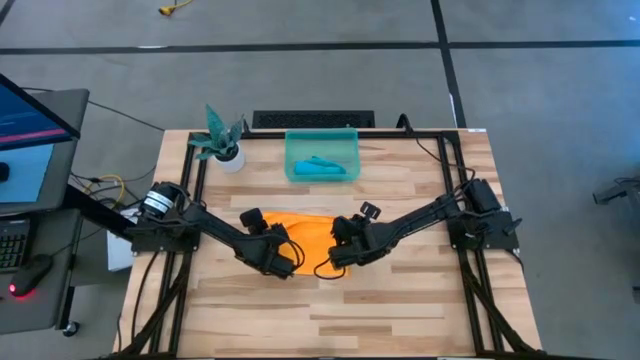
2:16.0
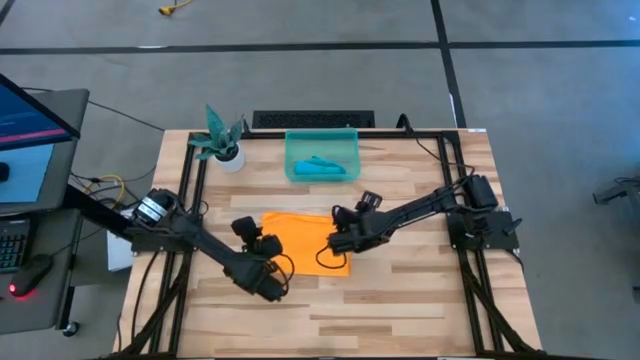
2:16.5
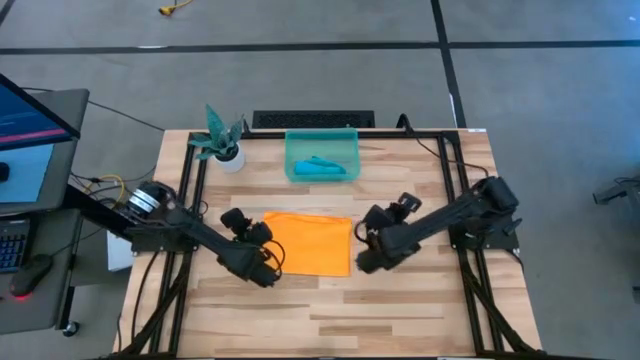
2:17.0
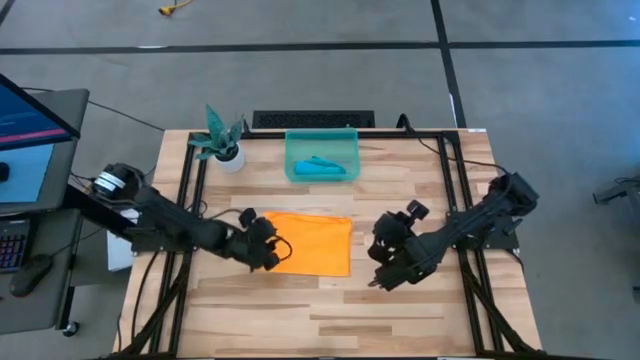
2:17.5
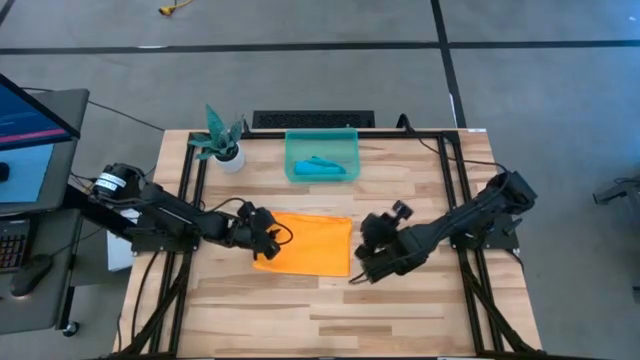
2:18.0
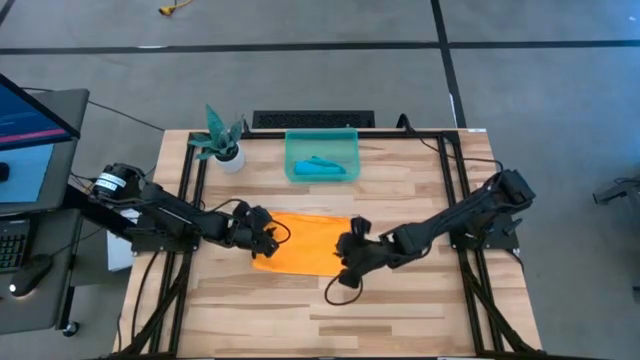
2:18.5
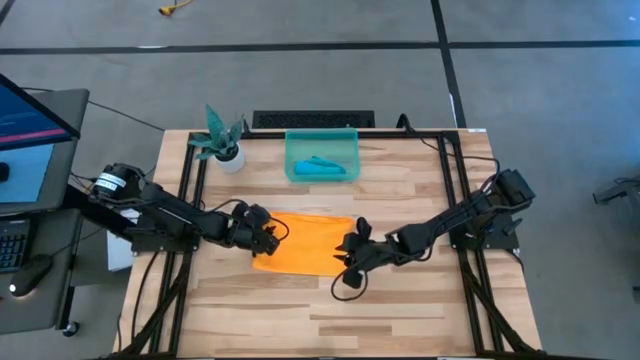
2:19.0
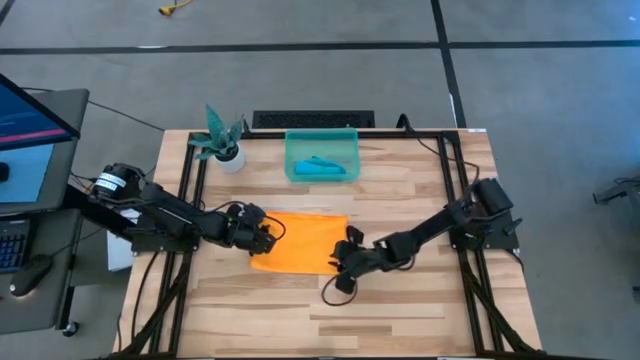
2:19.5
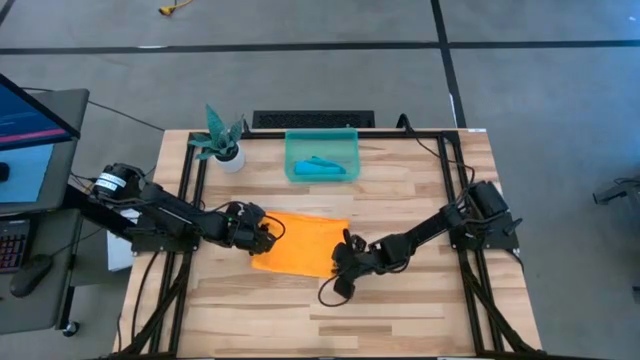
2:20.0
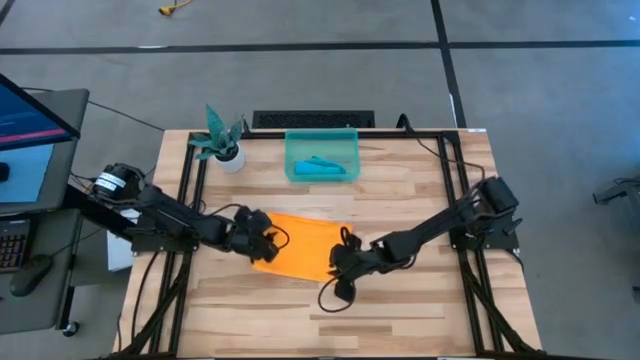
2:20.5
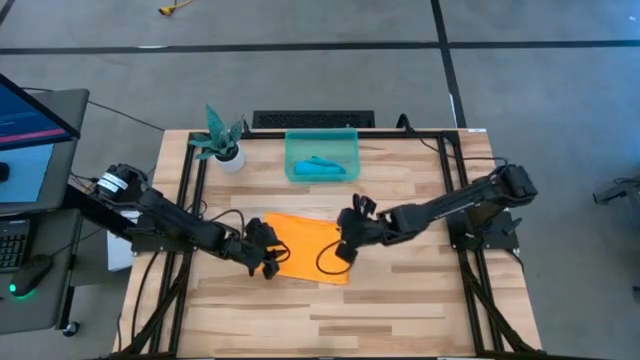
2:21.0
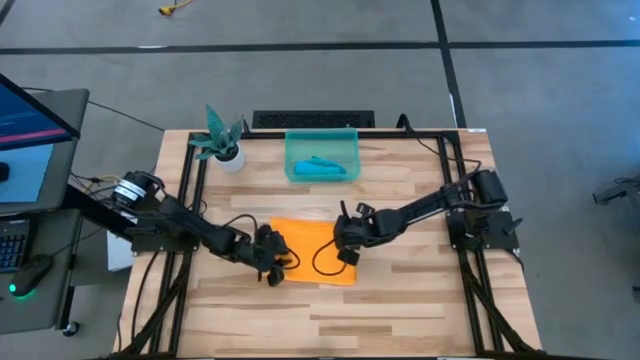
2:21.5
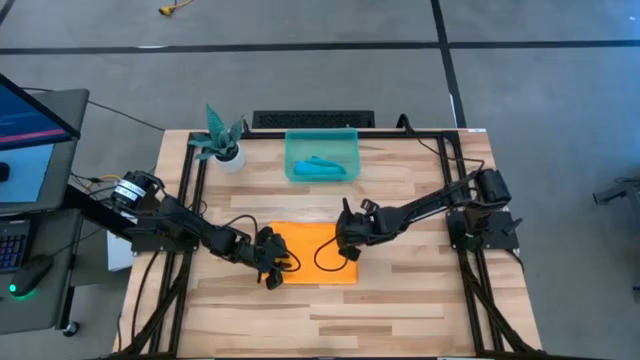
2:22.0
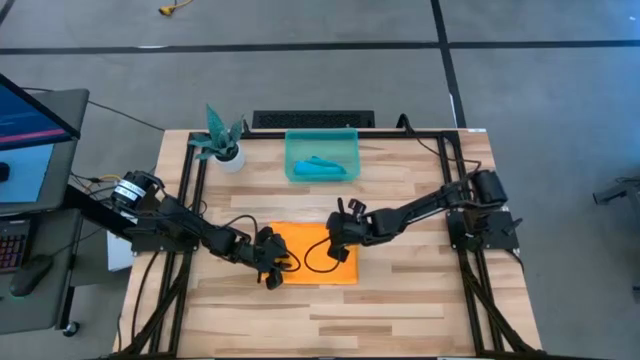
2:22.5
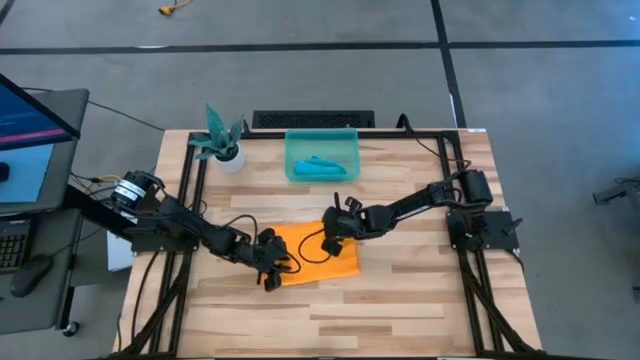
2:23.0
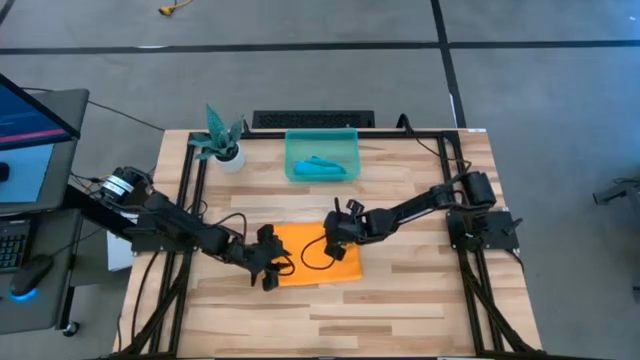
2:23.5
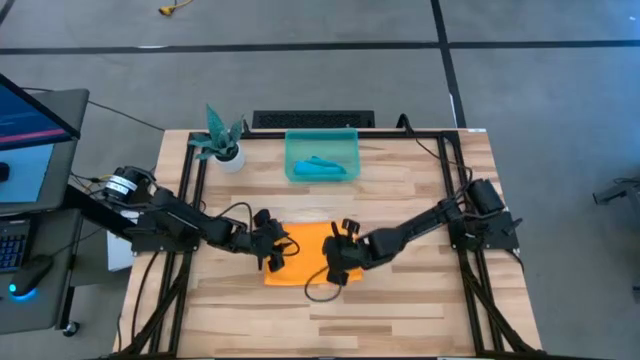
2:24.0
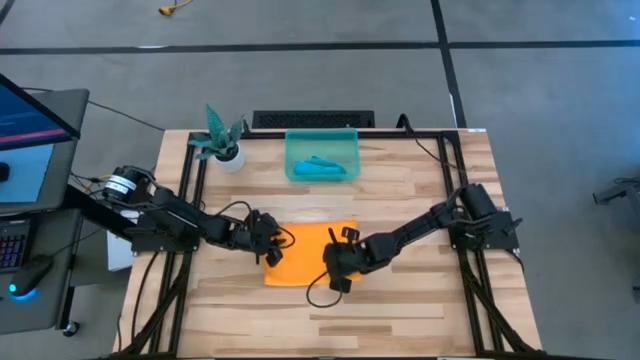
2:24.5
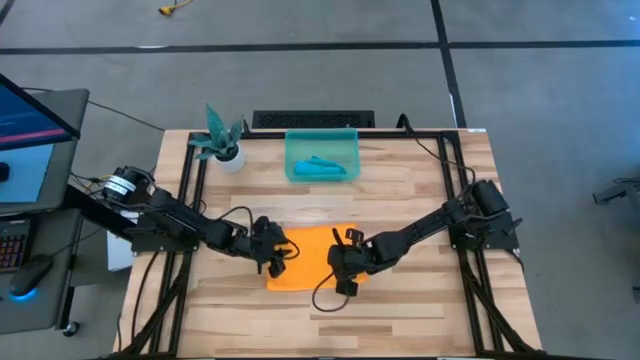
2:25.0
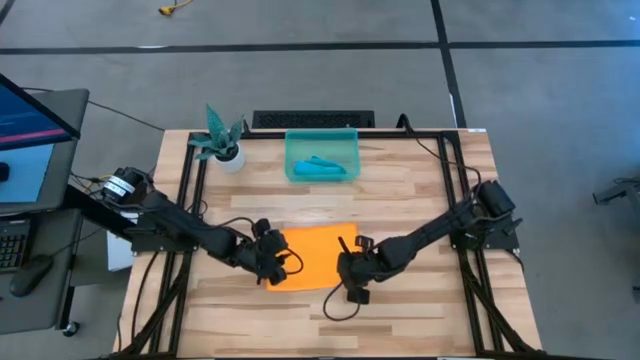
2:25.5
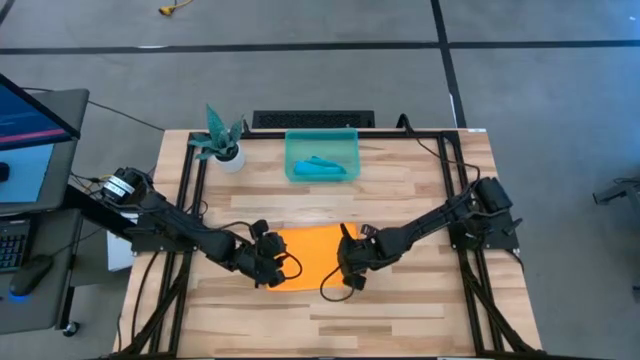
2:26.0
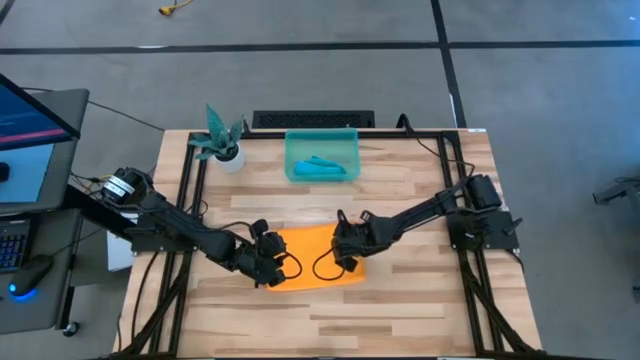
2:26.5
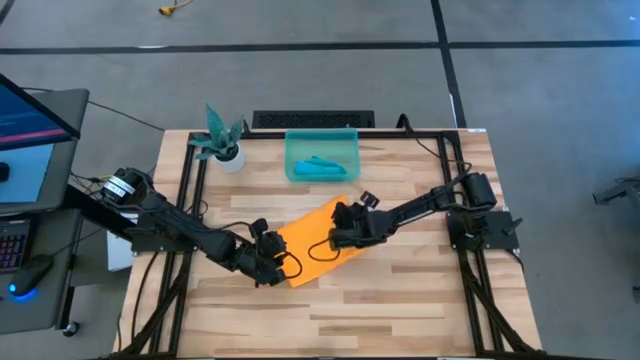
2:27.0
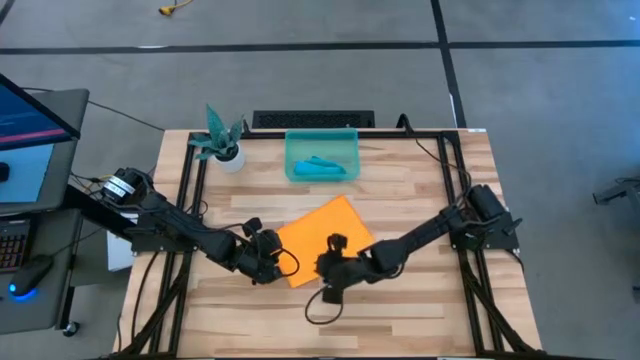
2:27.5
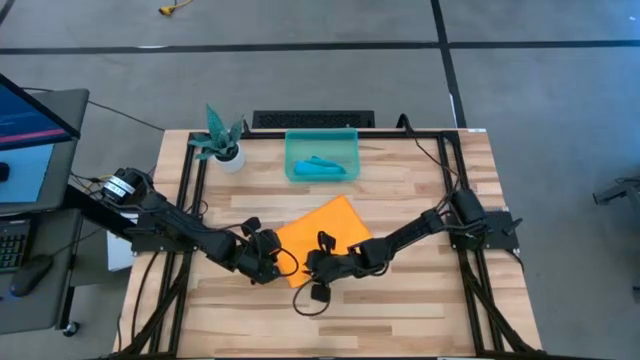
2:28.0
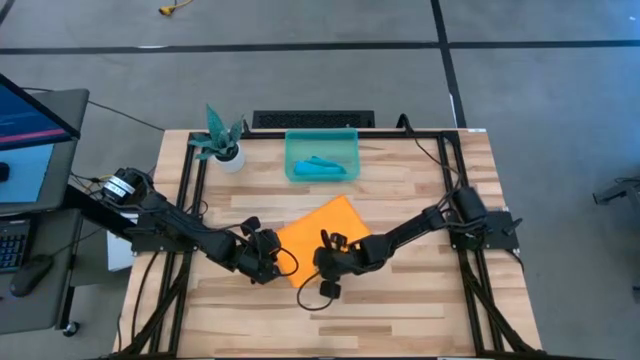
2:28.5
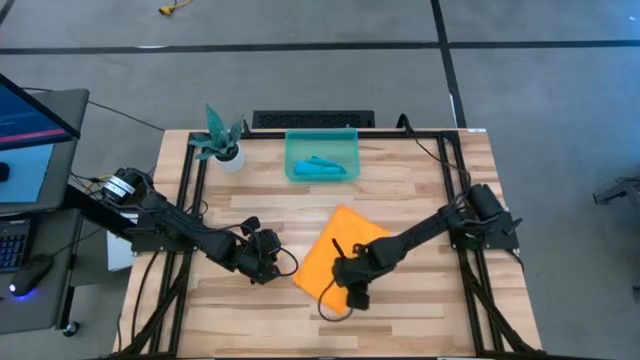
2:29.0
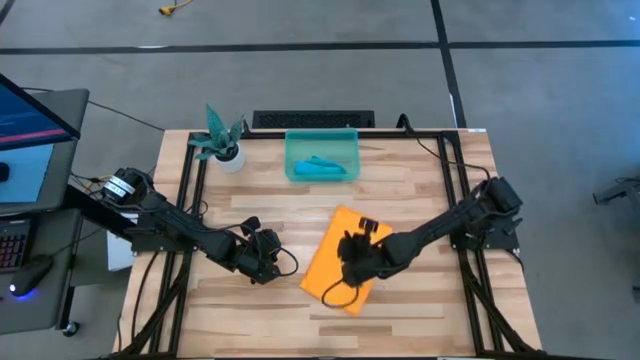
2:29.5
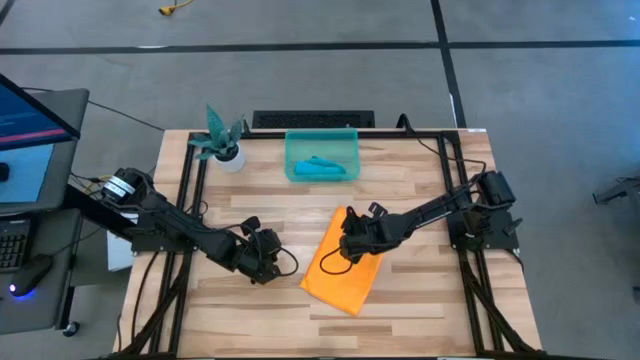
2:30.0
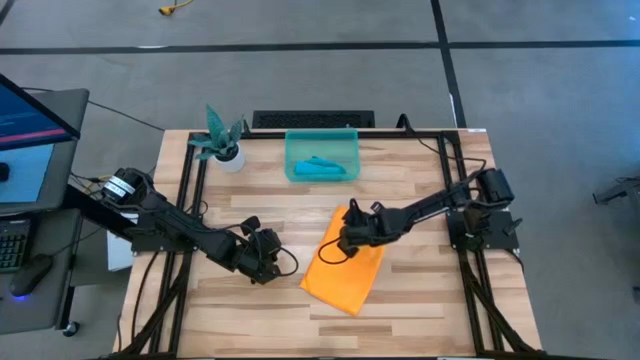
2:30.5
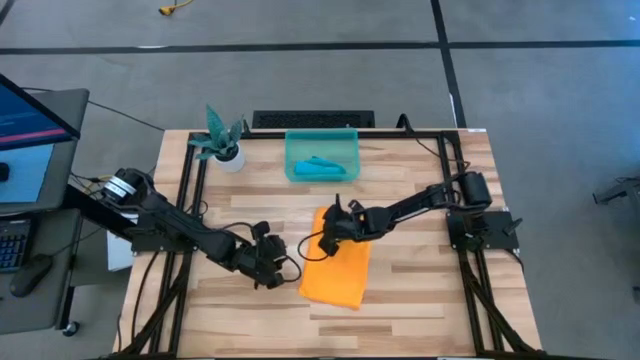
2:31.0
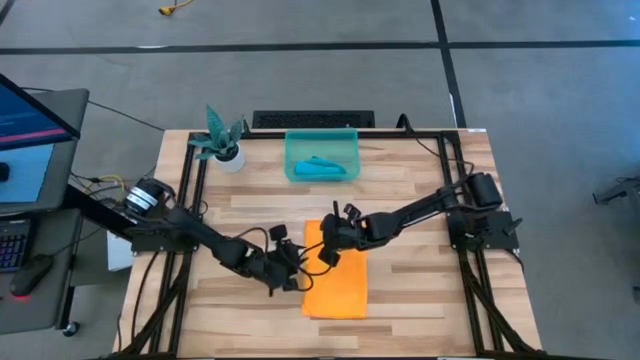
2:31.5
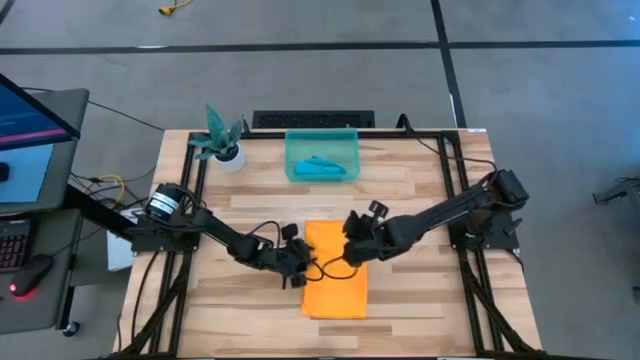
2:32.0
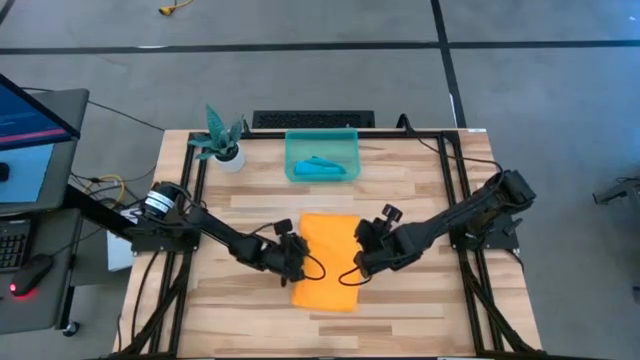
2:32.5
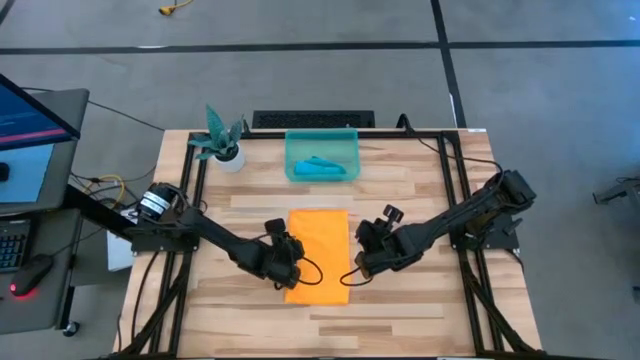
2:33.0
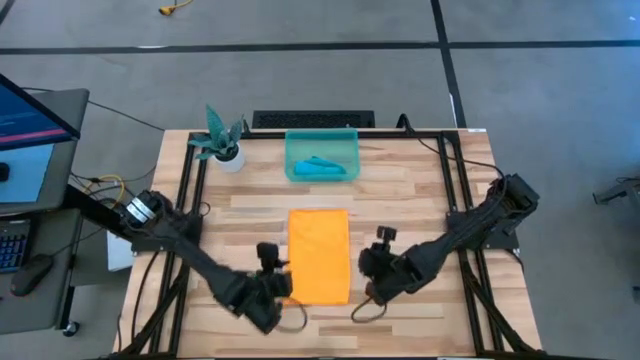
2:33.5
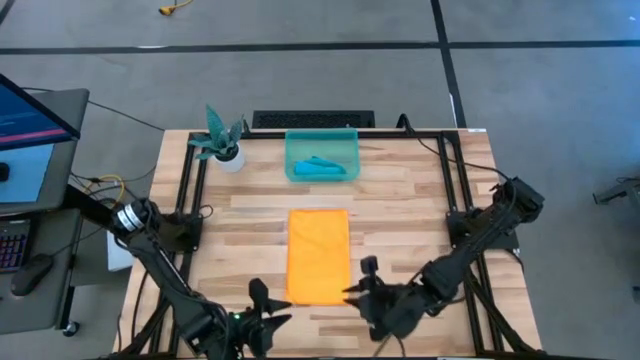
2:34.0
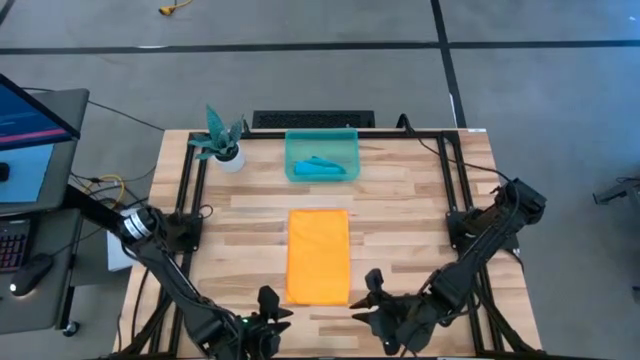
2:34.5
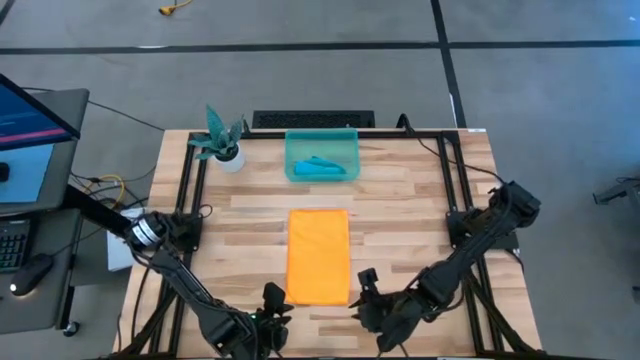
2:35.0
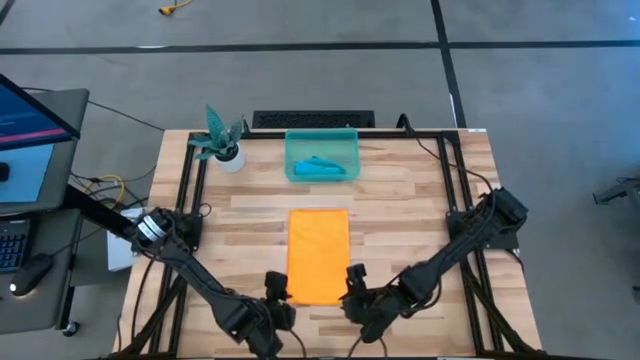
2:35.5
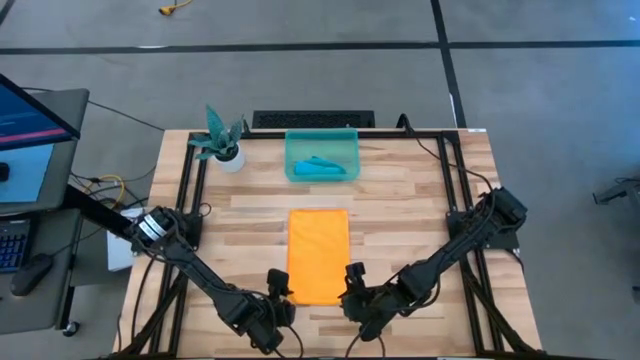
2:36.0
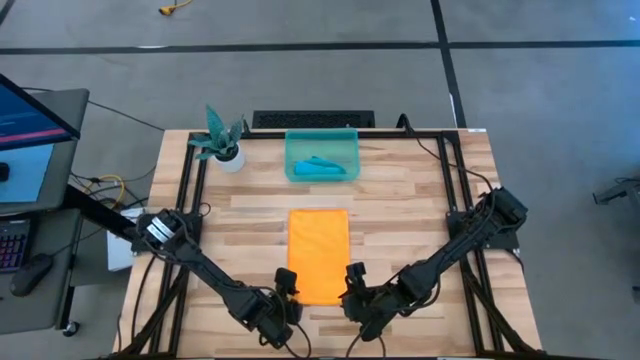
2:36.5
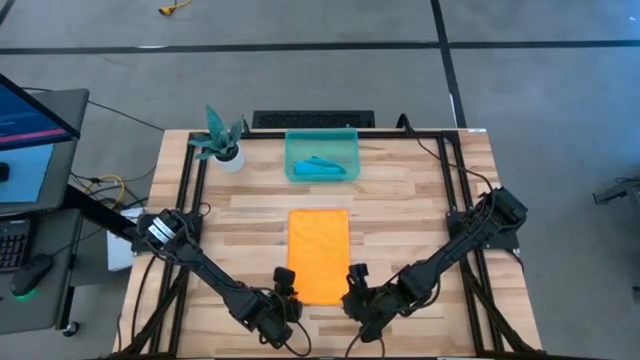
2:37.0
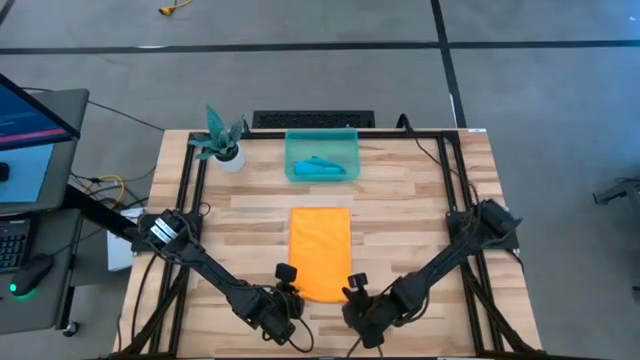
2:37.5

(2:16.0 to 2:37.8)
Task: Roll microfiber towels into tight, uniform cylinder then place into a basket
Roll the orange microfiber cloth
